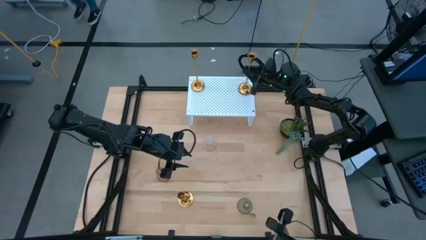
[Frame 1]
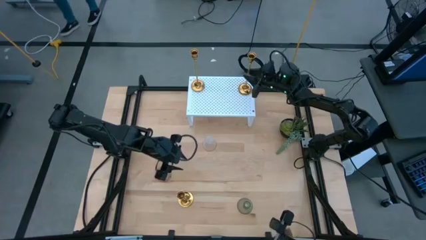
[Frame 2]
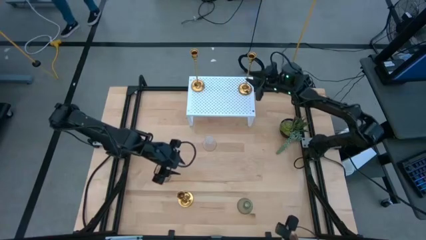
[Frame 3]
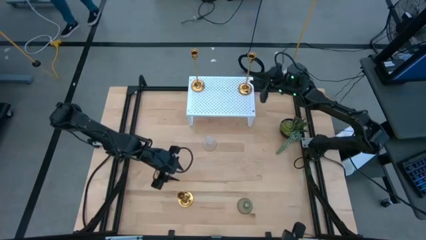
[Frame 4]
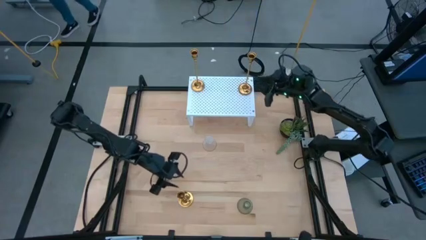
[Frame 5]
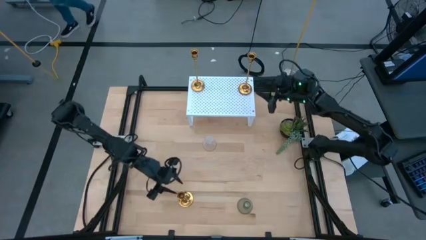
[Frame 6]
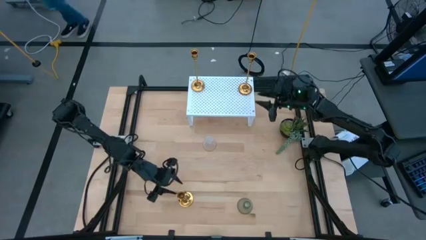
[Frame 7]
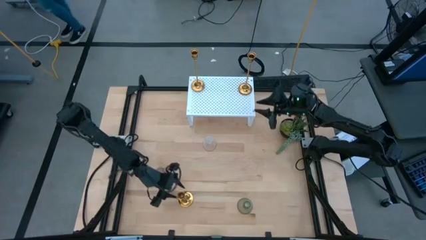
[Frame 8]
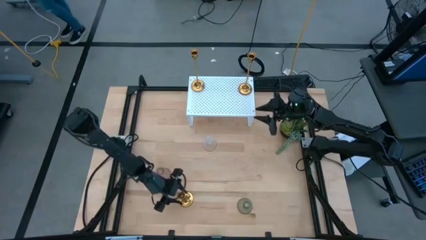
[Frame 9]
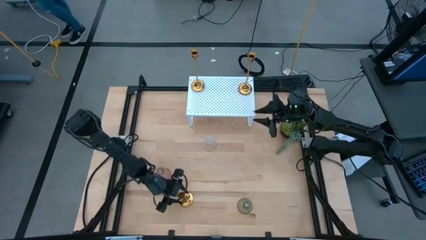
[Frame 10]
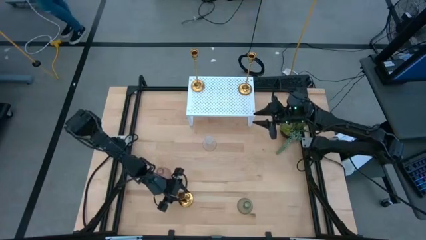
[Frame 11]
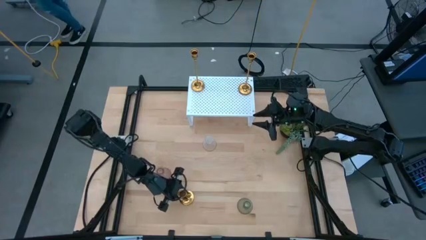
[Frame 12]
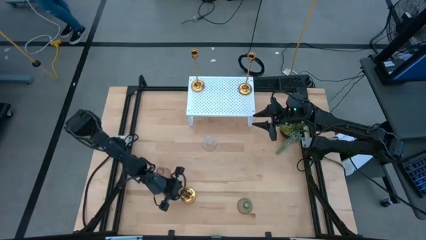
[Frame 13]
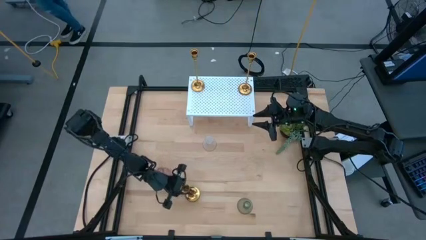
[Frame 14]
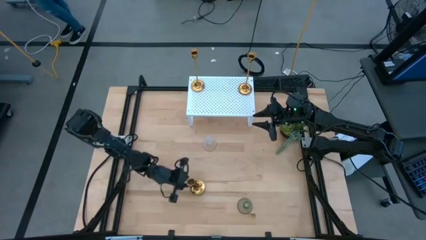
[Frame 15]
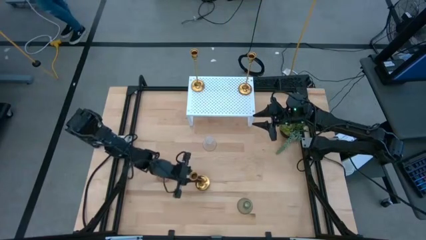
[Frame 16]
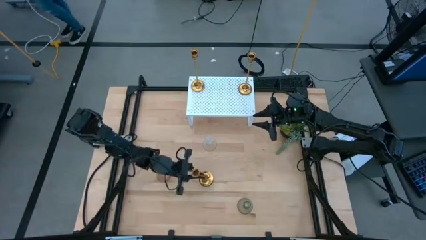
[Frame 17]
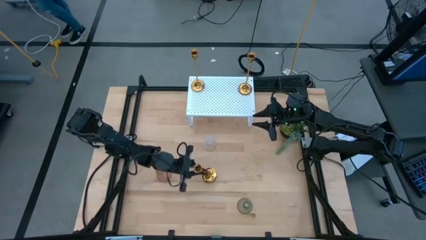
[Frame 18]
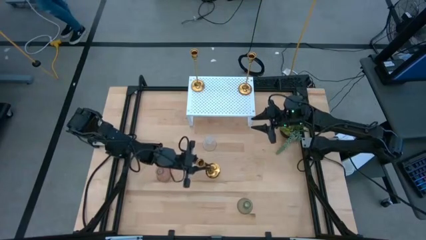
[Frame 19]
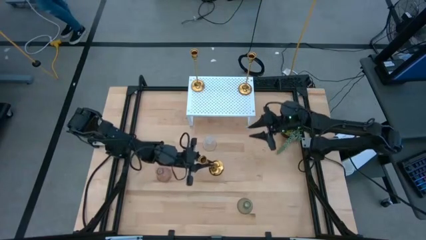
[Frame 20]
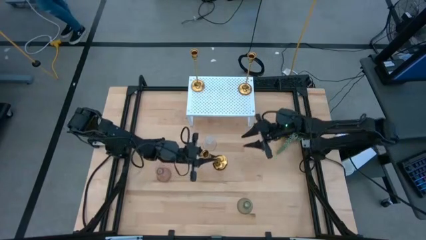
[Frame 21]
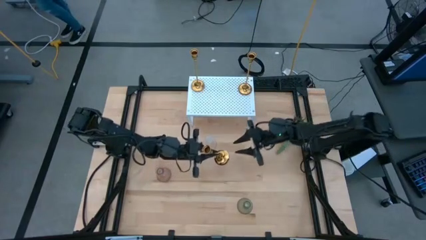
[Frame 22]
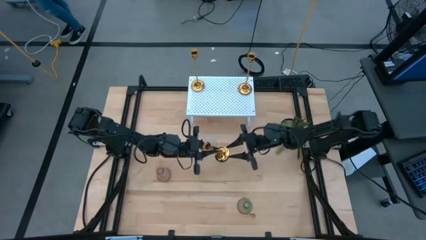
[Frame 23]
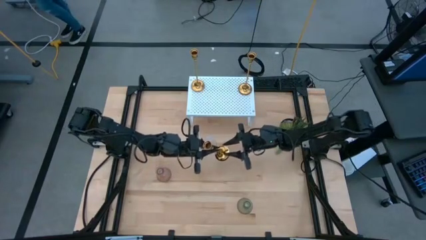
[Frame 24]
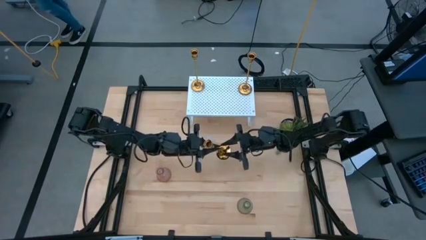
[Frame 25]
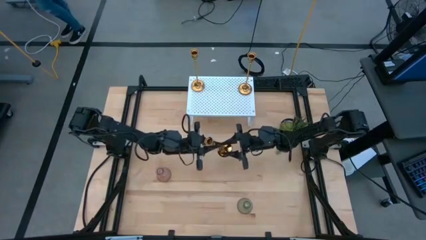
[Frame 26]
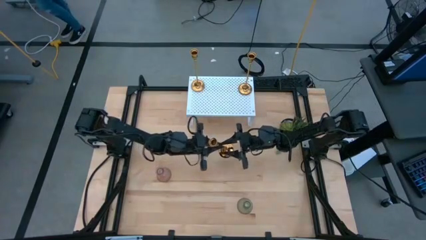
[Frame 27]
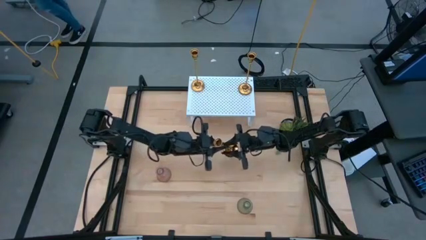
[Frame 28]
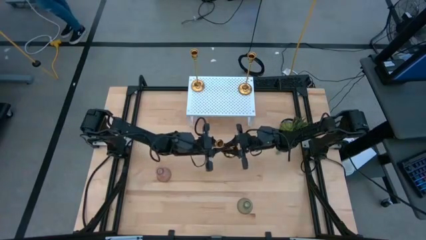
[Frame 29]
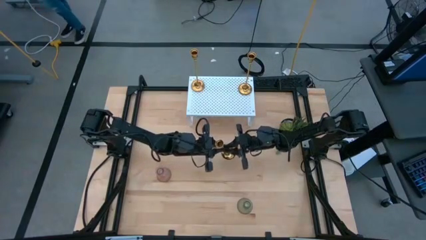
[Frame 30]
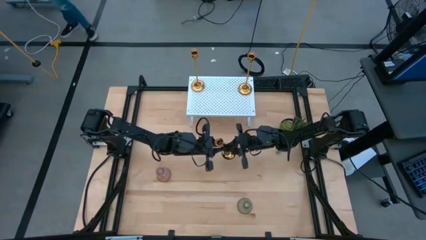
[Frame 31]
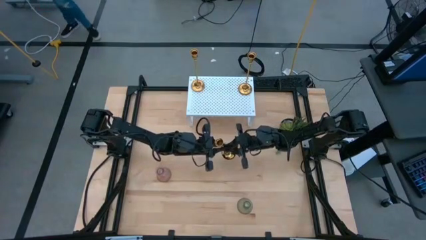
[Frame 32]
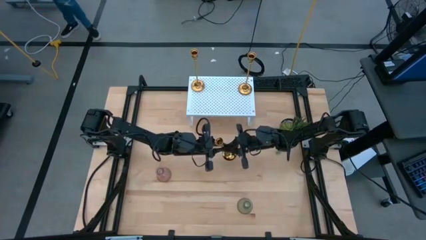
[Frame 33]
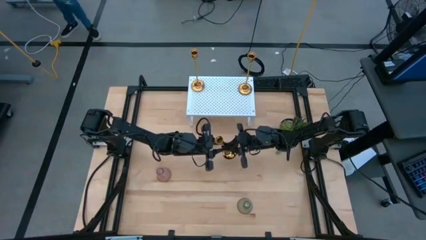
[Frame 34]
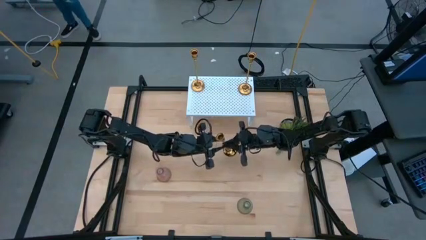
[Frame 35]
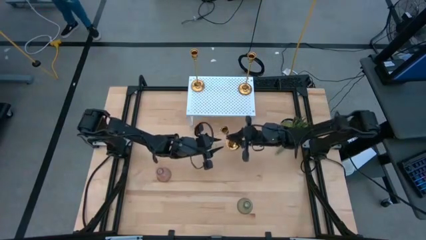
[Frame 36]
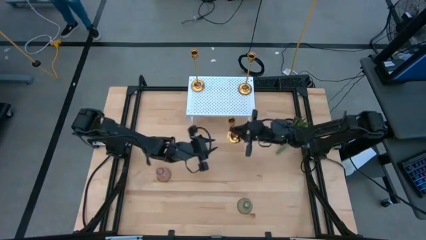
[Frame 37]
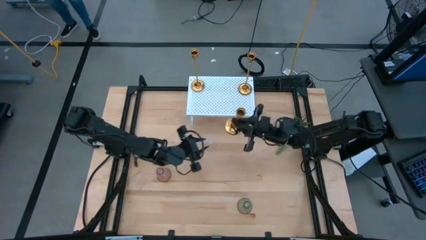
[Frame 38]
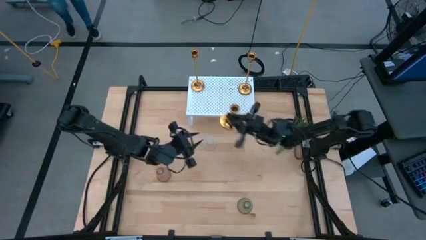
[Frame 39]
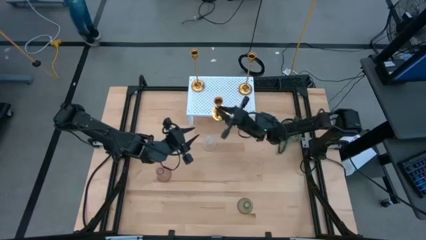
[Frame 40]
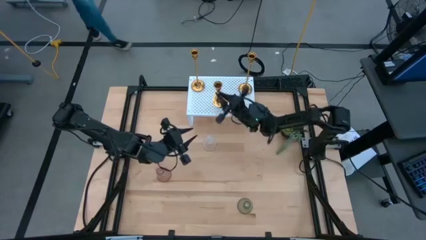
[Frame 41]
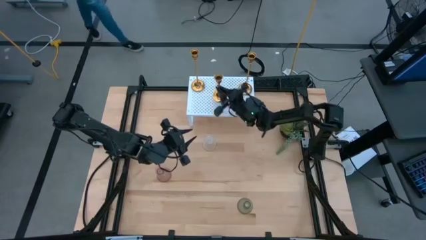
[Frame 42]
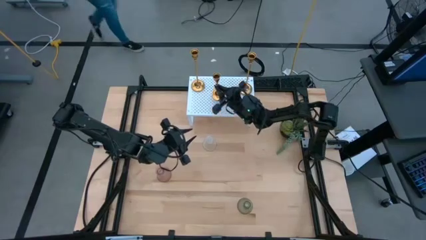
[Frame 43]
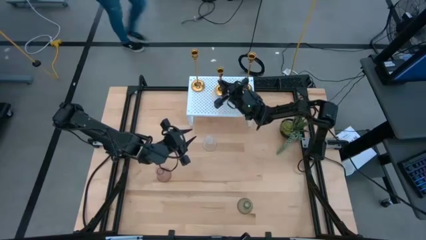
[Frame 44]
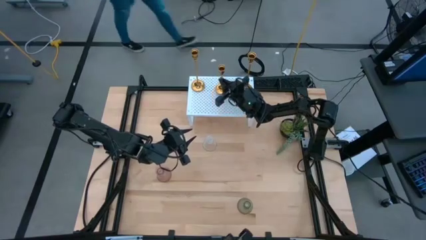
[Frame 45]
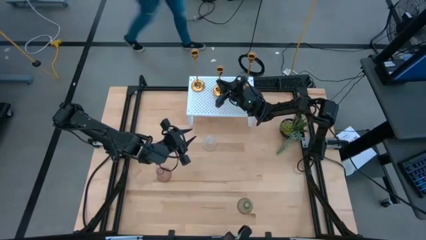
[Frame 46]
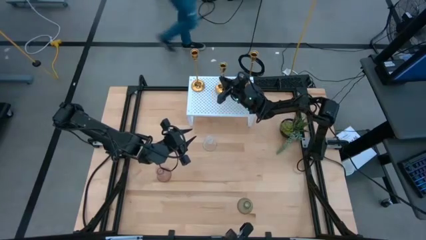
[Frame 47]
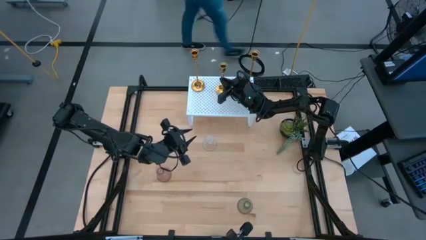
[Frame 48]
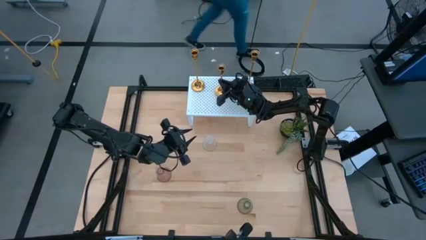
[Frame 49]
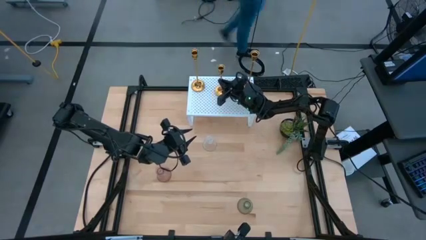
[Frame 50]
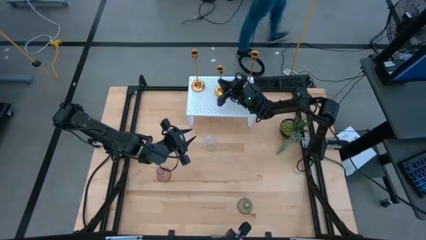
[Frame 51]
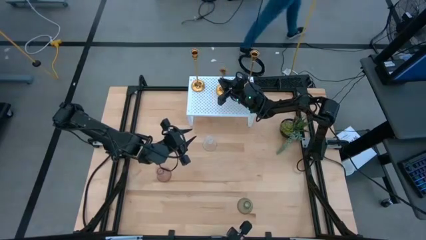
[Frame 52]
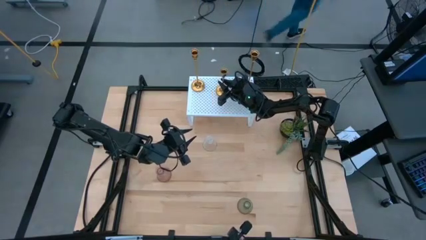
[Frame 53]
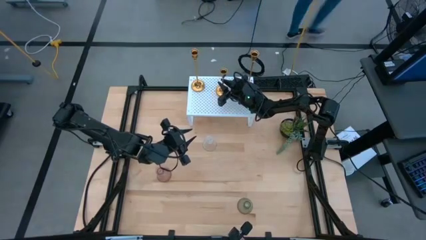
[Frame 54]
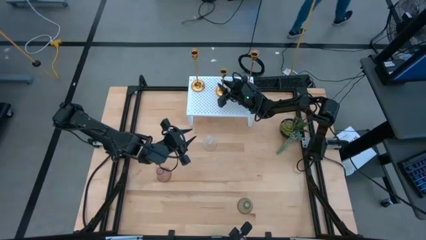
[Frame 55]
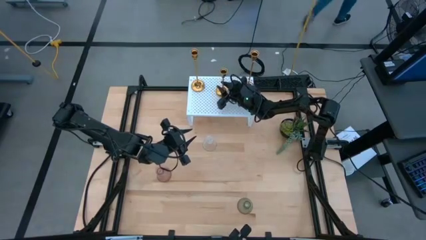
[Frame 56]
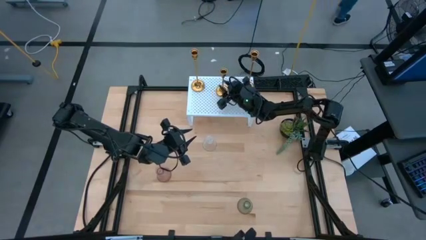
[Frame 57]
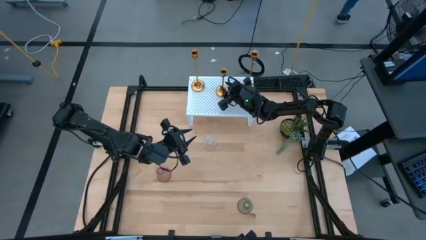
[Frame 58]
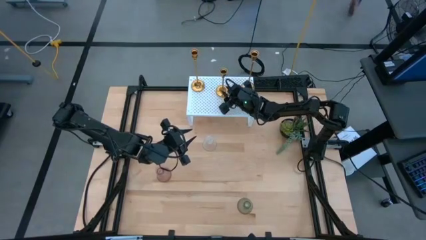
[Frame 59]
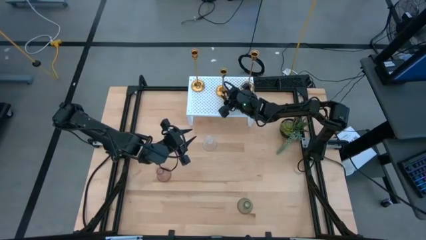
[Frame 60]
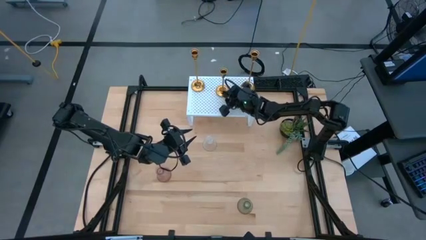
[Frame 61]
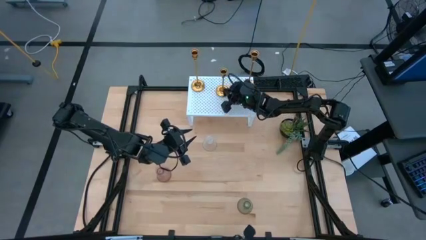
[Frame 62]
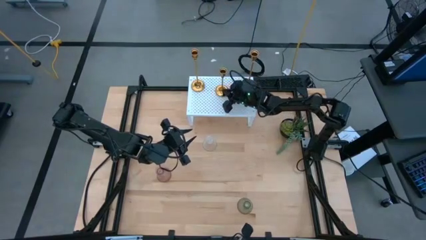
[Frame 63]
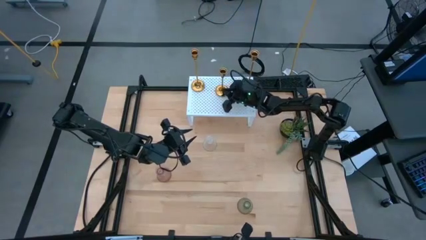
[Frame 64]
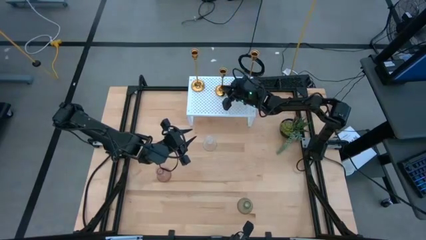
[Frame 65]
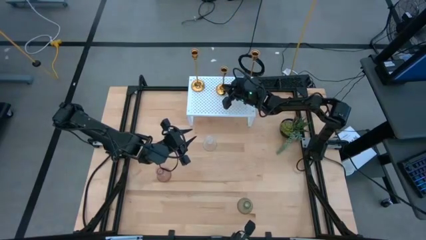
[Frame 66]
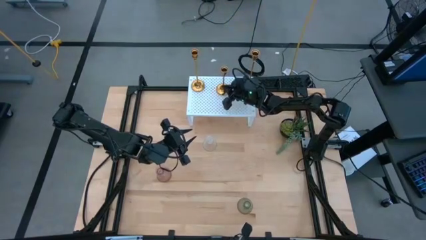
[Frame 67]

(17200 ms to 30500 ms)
Task: Pick & Place candle stick holders
Put the gold candle holder on the shelf aligned with the other gold candle holders

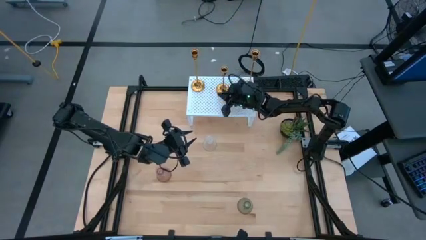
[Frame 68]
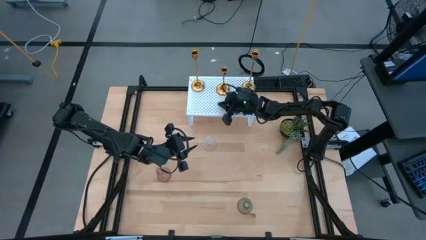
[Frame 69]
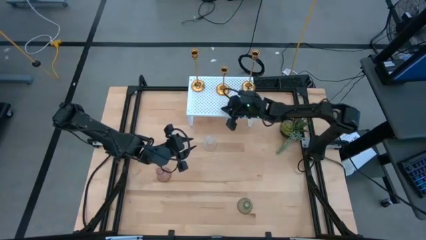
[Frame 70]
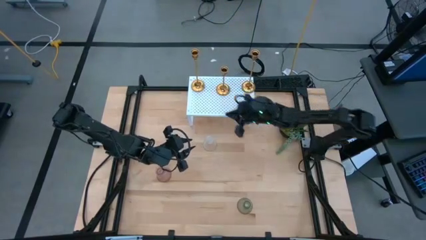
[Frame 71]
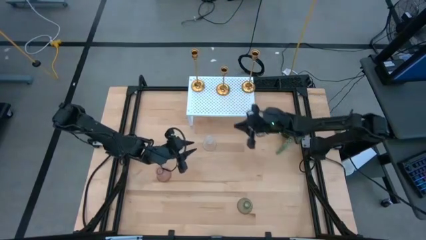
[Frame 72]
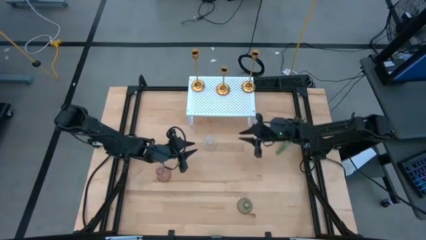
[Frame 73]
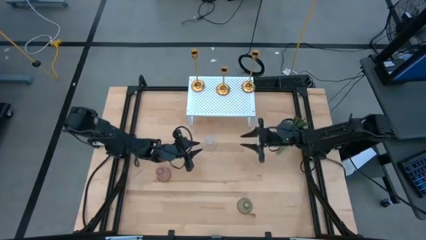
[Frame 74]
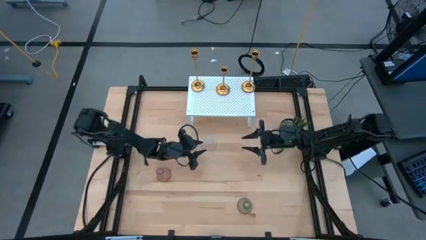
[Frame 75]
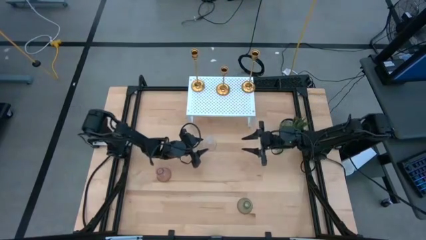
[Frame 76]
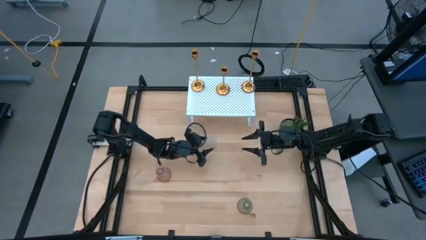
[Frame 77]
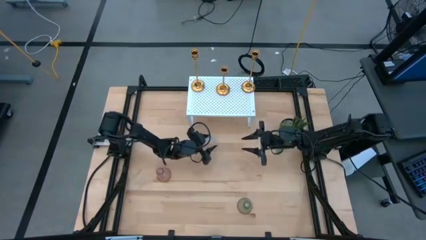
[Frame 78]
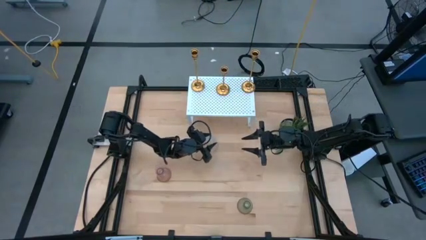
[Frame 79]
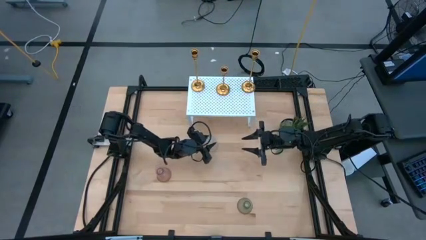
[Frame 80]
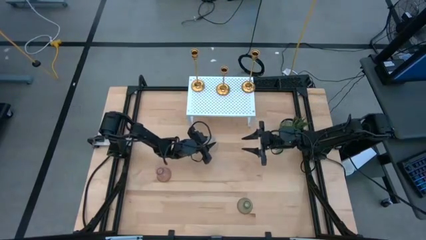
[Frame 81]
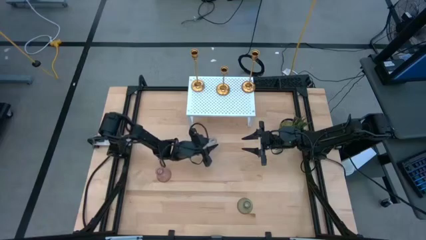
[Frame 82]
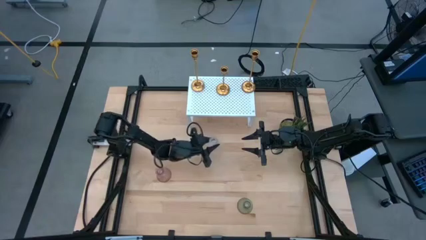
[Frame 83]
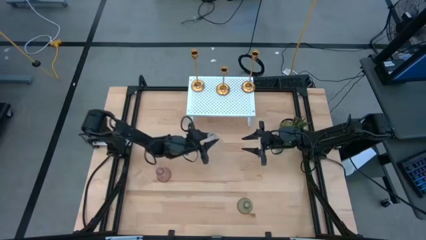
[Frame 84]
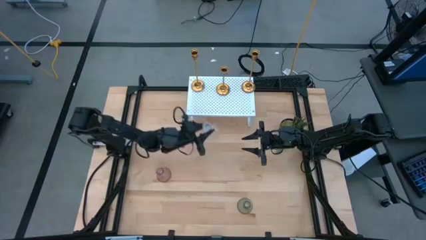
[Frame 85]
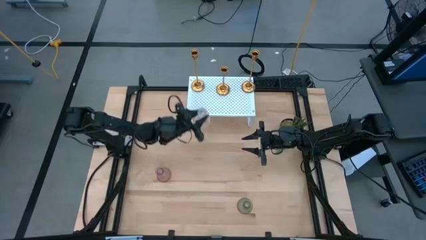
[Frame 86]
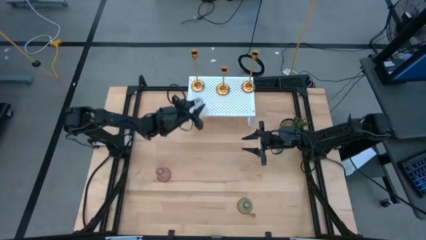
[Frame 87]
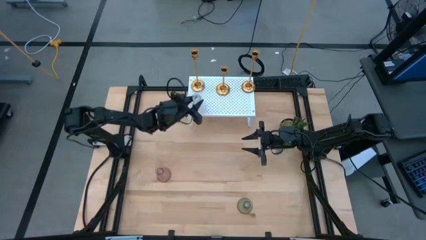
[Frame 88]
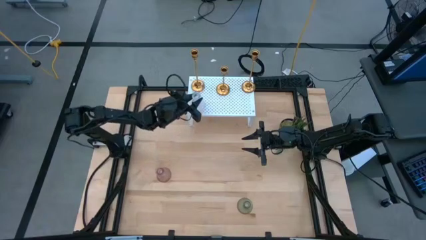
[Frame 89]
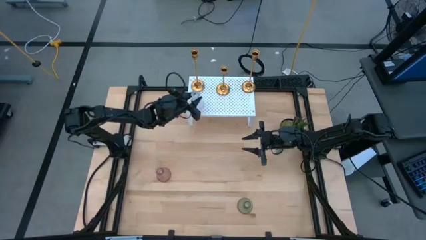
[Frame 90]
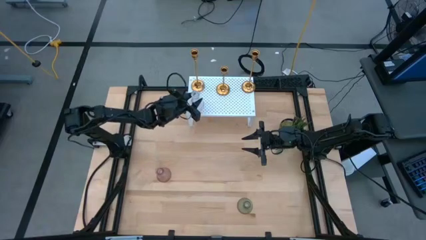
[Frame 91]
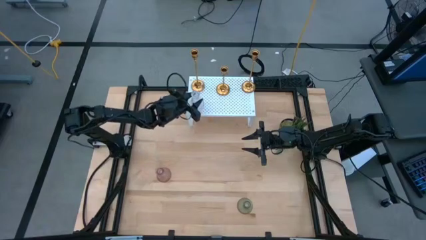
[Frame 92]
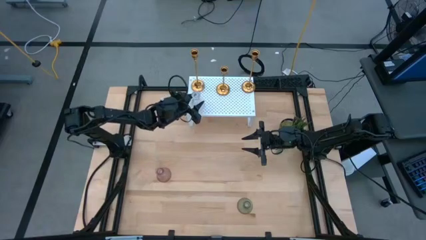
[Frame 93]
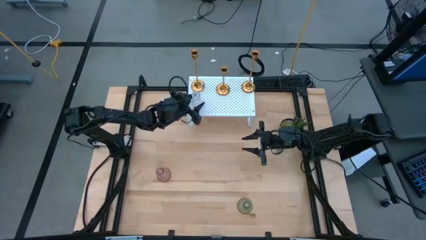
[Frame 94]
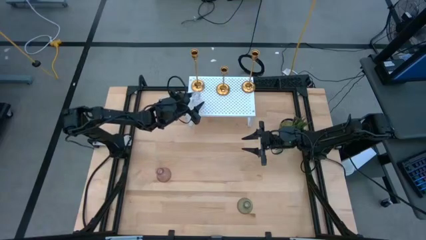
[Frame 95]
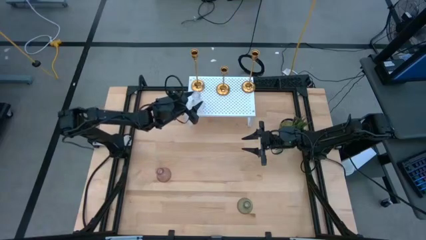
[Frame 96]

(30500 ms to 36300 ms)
Put the transparent glass candle holder on the shelf
